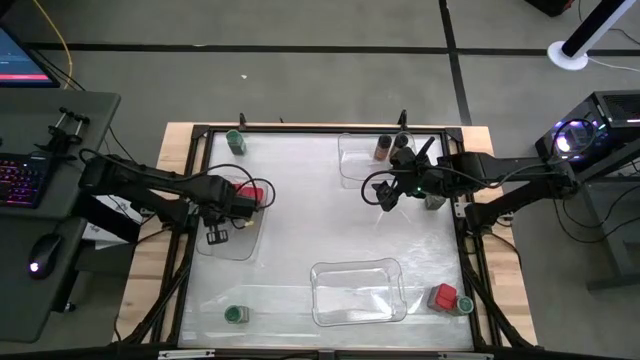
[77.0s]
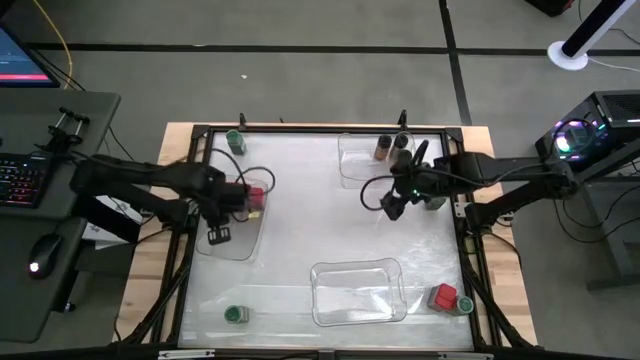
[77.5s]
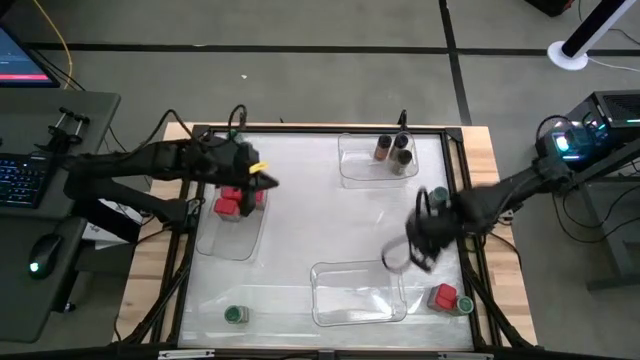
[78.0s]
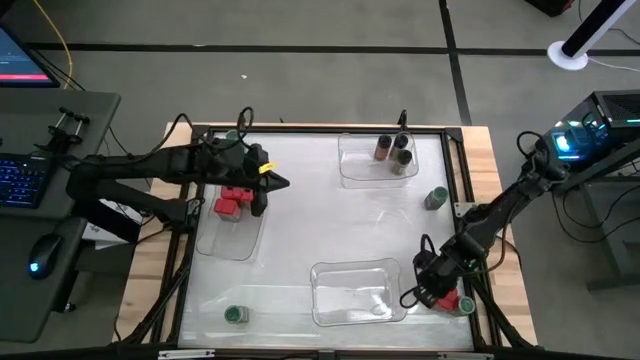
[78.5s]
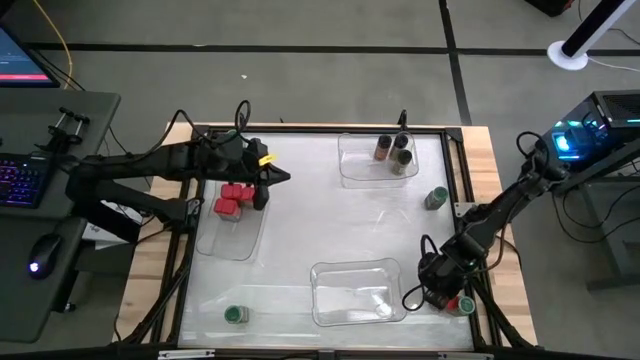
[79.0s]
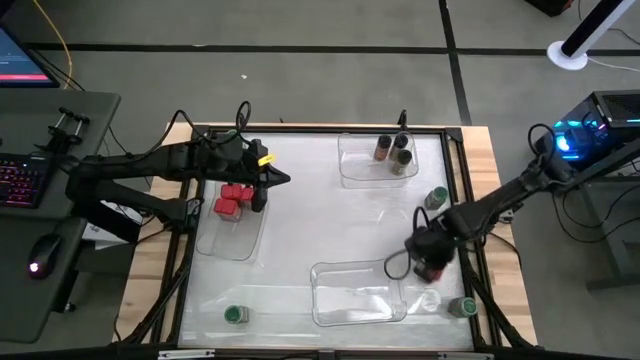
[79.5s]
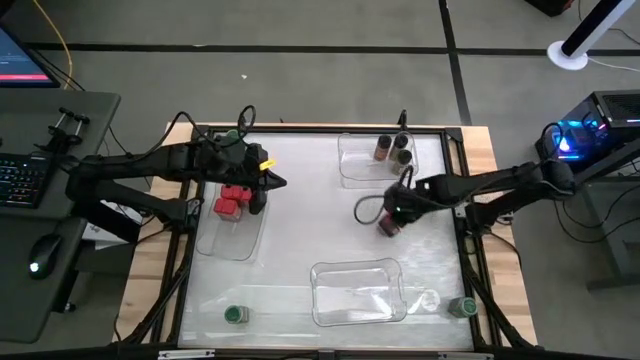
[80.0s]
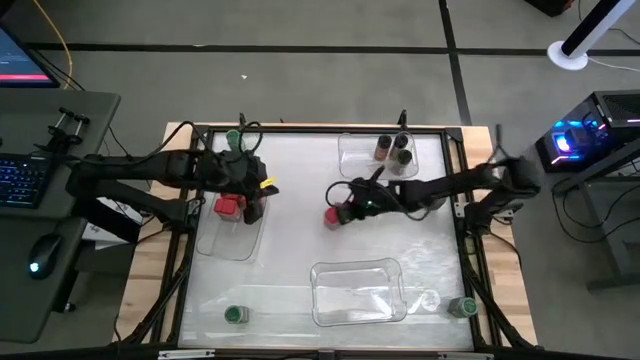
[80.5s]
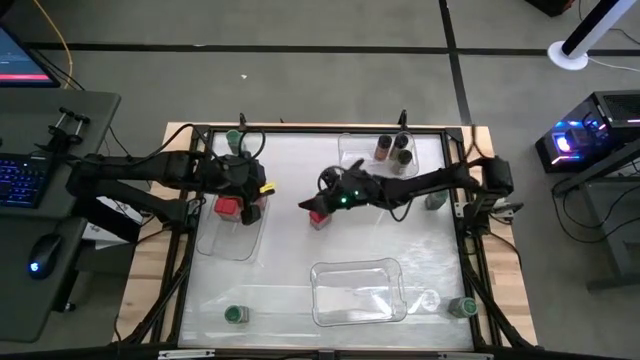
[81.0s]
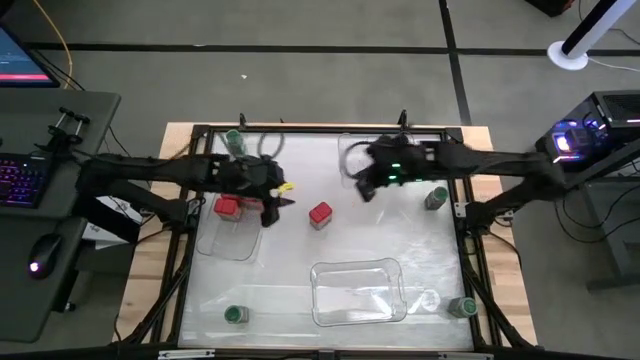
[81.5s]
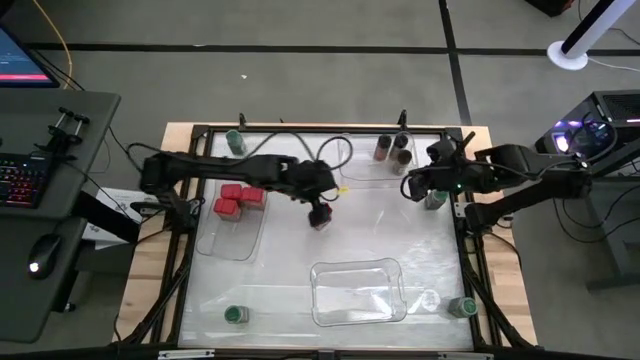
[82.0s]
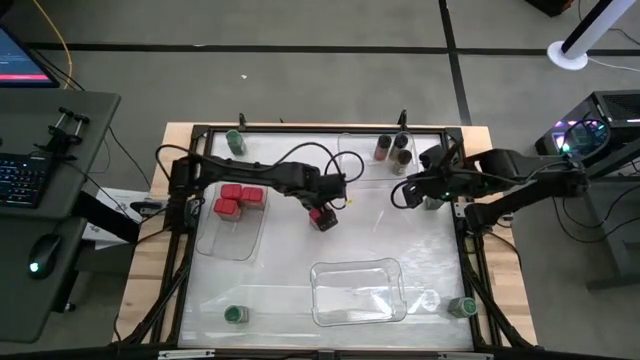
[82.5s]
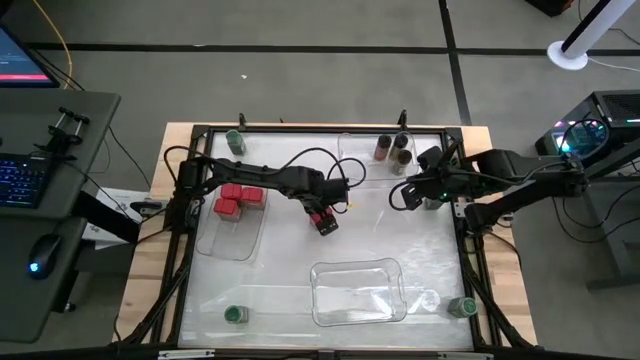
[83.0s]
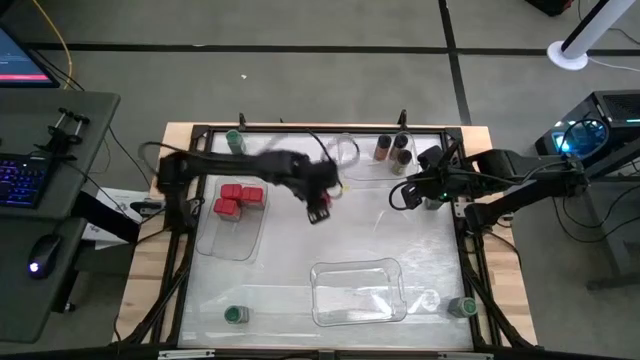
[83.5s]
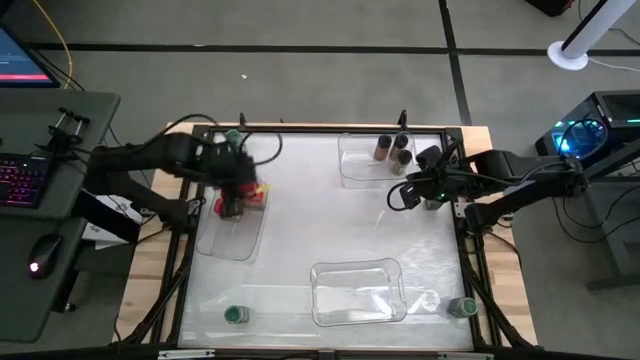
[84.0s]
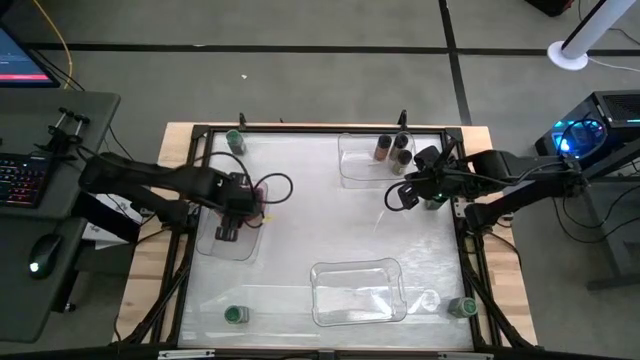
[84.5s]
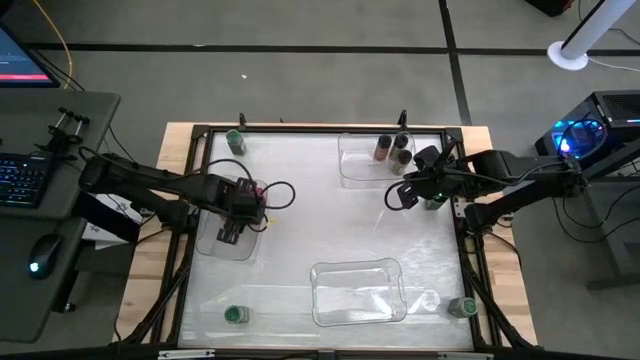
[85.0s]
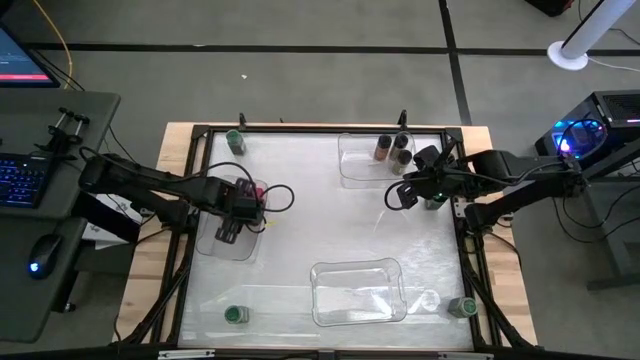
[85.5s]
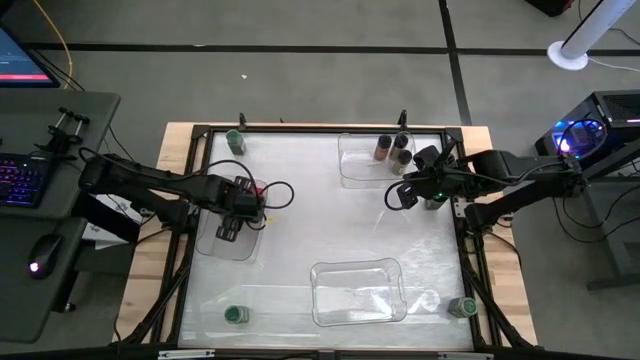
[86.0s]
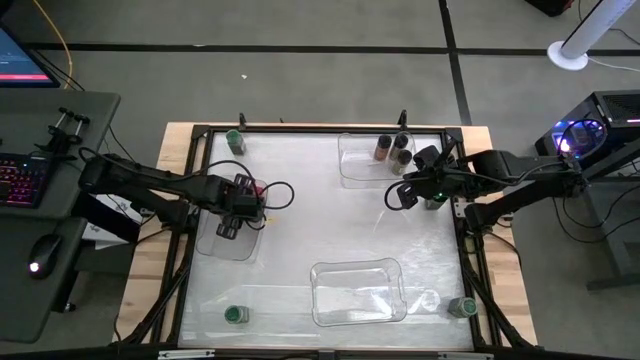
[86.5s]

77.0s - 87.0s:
Task: Sort spices by type
Put the red seasoning can into the middle left transparent bin

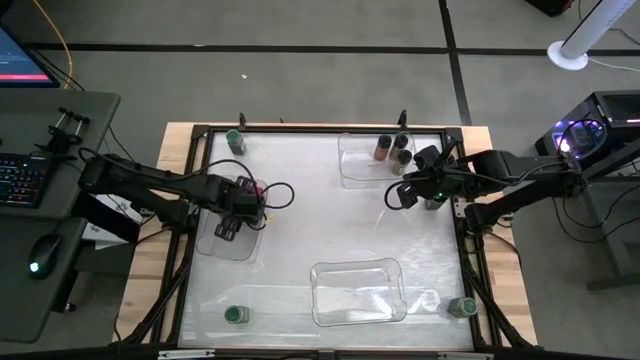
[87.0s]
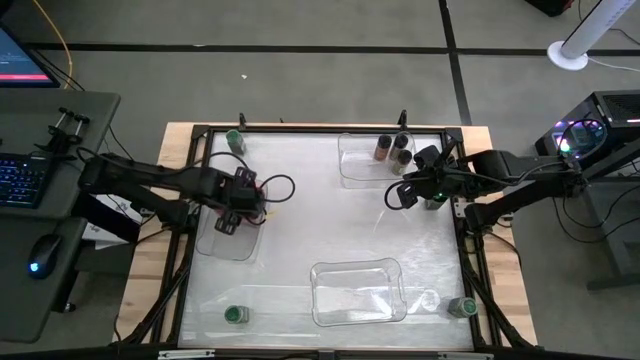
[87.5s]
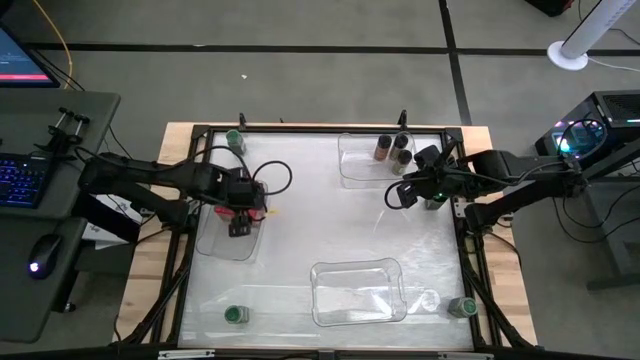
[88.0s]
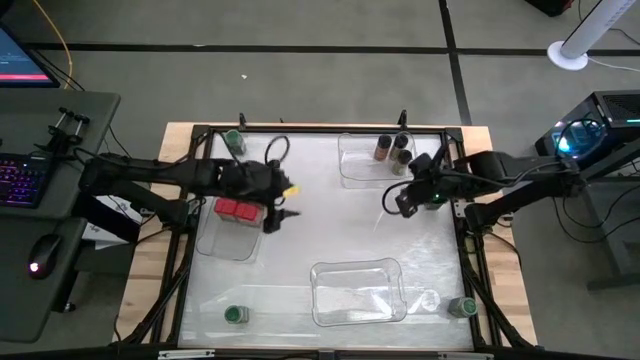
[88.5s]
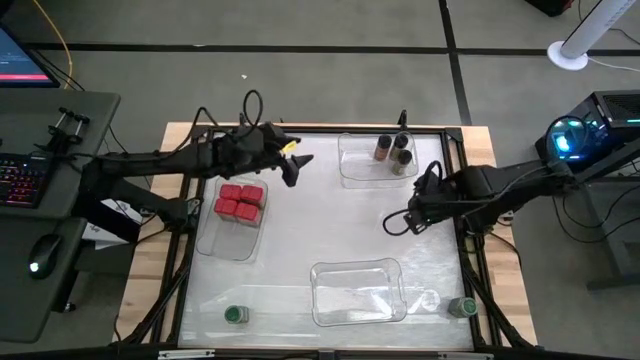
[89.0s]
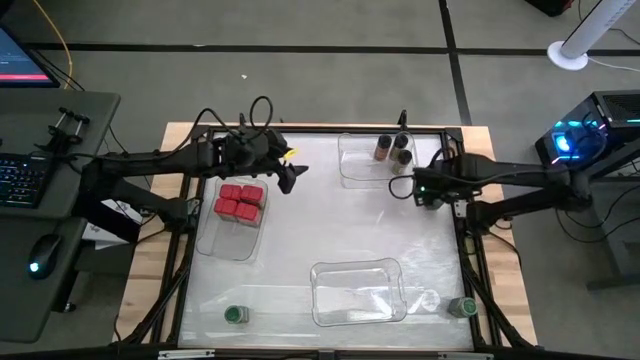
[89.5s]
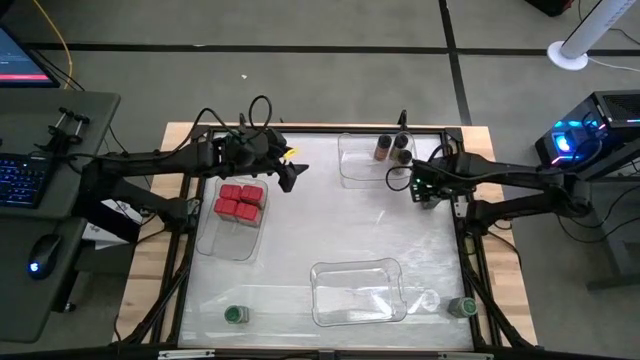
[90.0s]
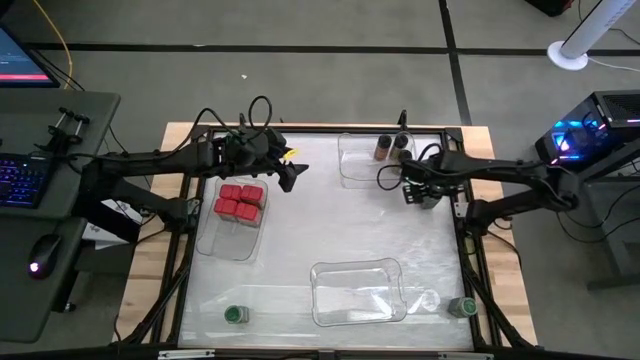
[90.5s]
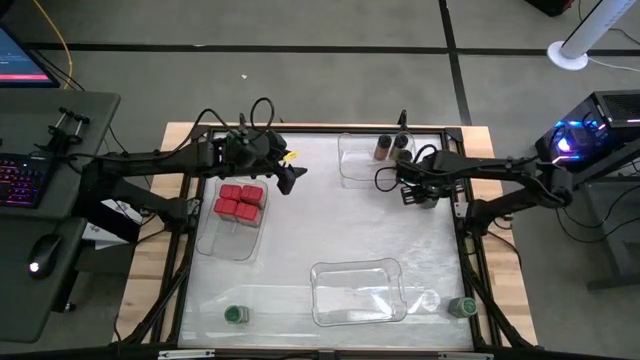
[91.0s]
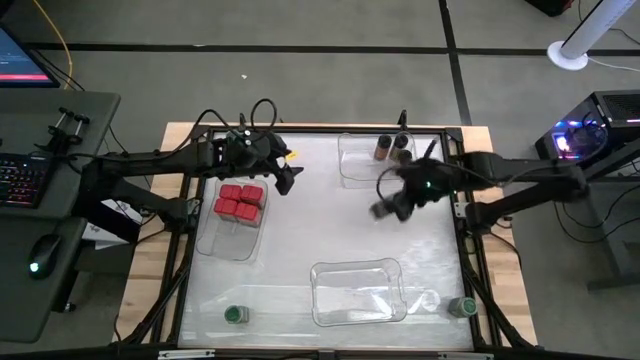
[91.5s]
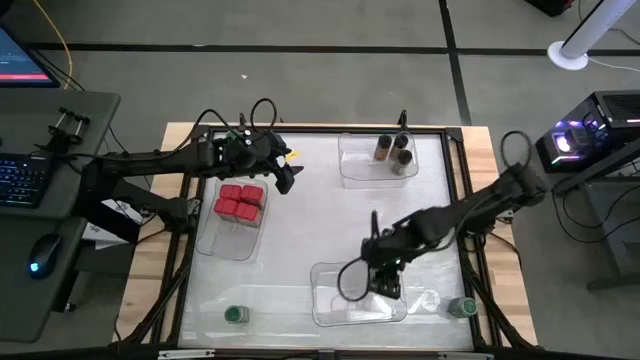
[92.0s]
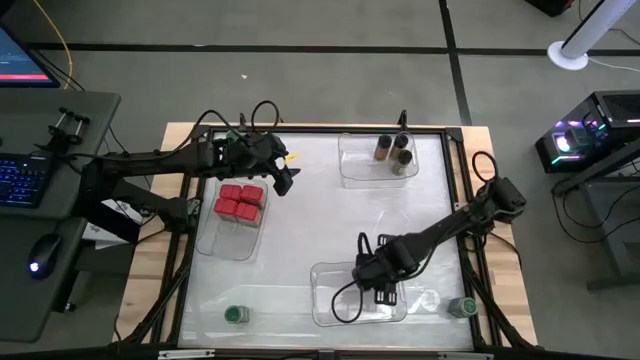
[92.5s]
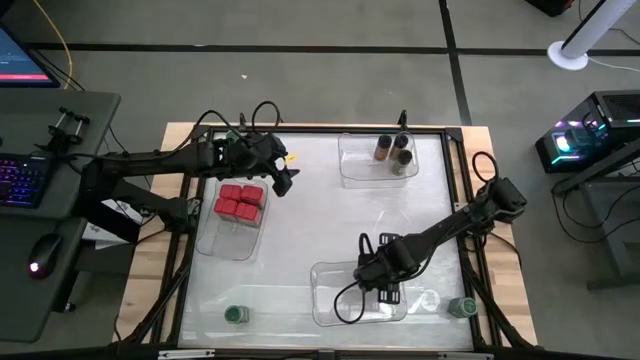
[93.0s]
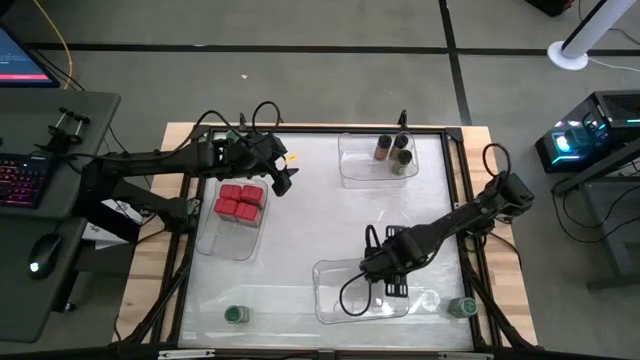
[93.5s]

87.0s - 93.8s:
Put the green seasoning bottle into the bottom right transparent bin

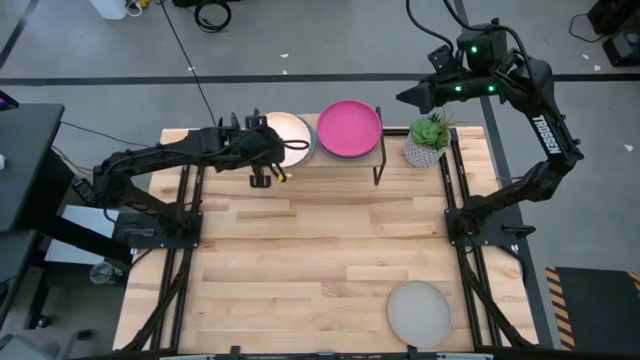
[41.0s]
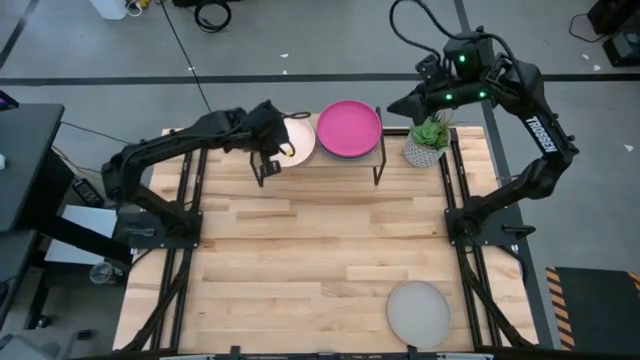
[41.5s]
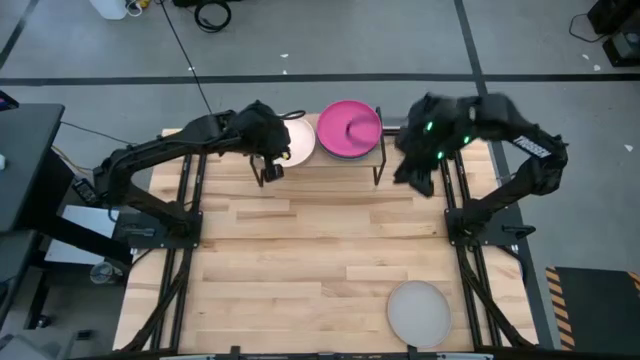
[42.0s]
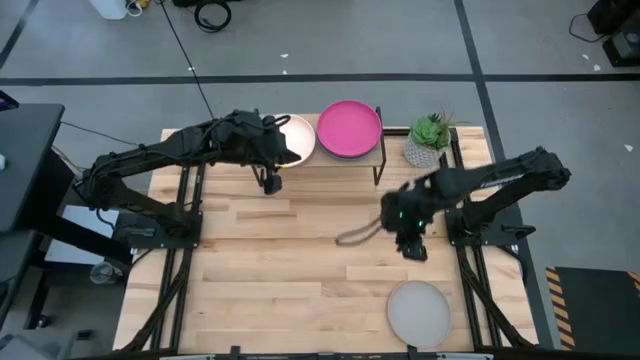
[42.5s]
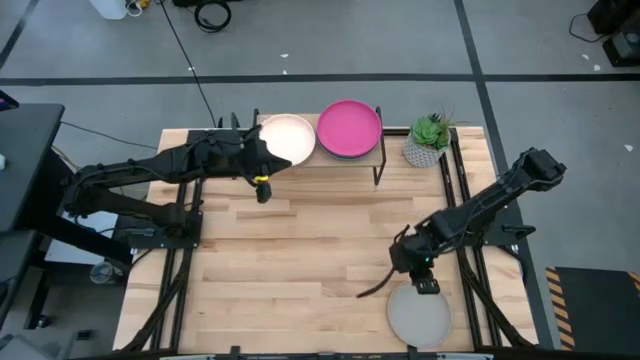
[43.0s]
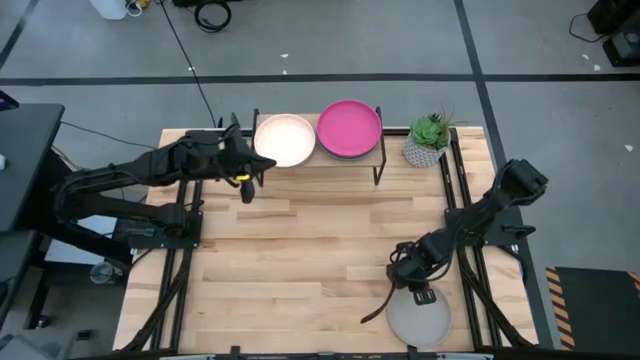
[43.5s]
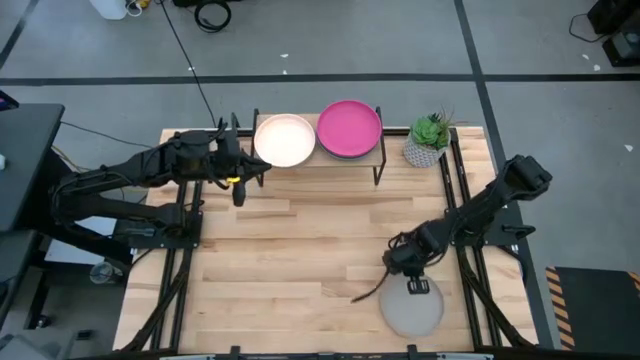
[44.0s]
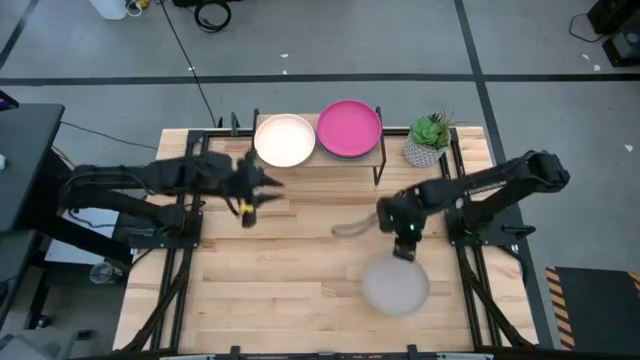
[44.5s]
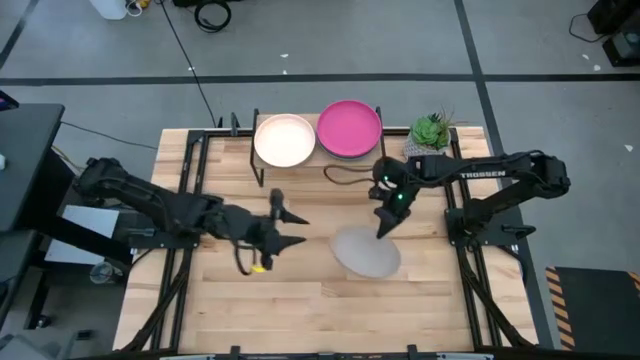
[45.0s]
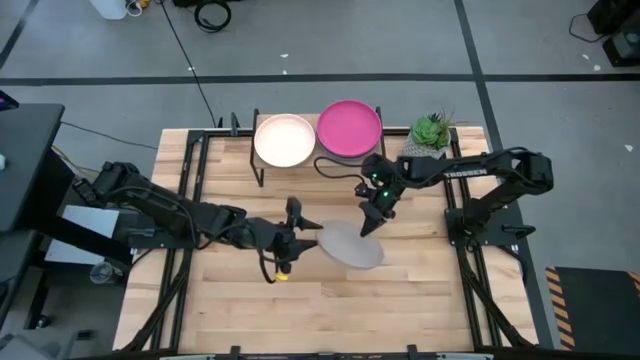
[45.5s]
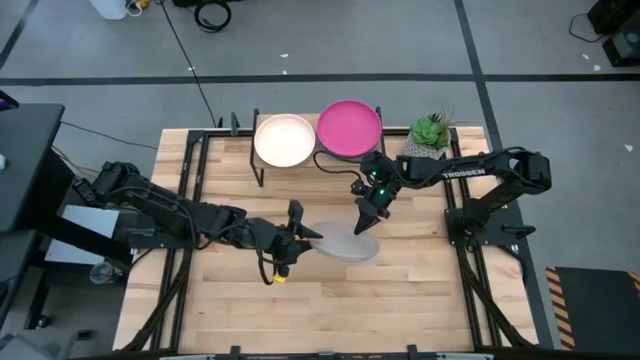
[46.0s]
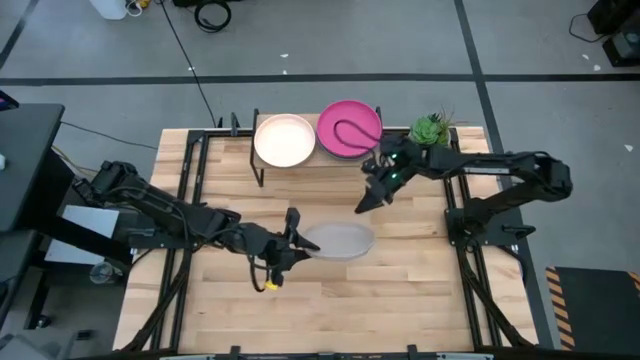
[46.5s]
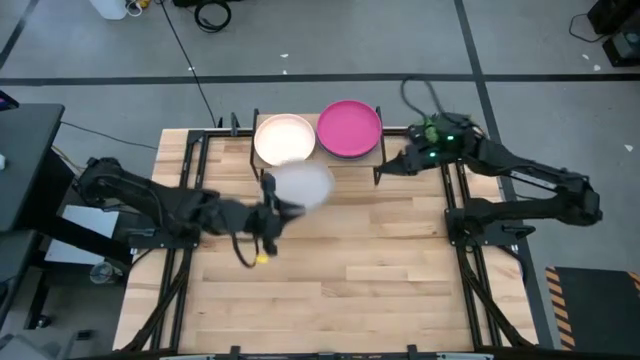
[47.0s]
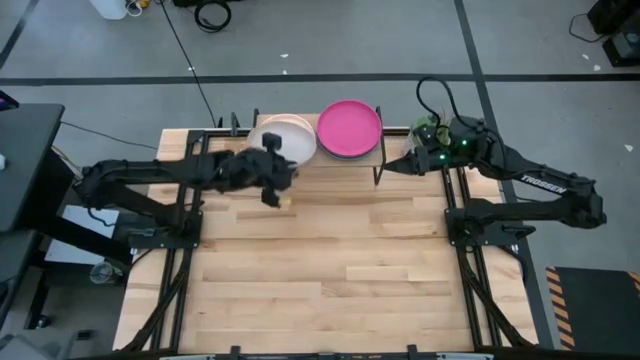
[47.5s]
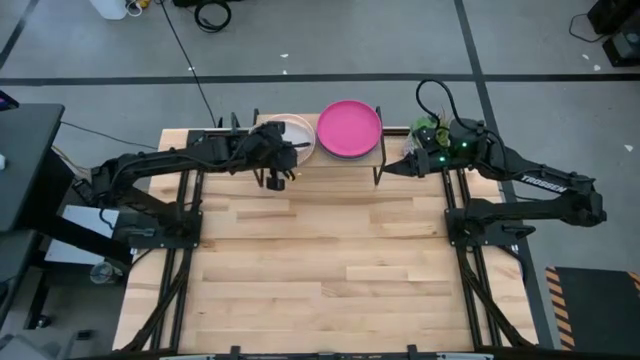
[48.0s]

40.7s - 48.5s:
Task: Place and stack plates onto a shelf
Stack the white plate into the light yellow plate on the shelf
